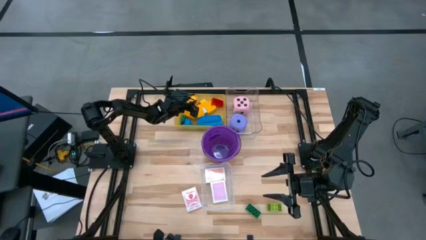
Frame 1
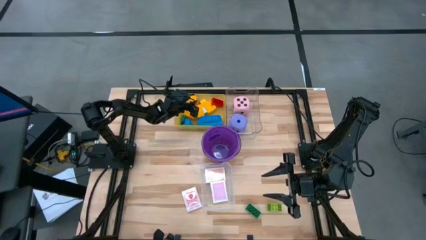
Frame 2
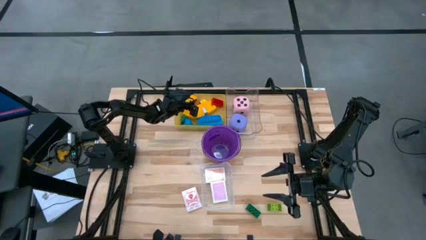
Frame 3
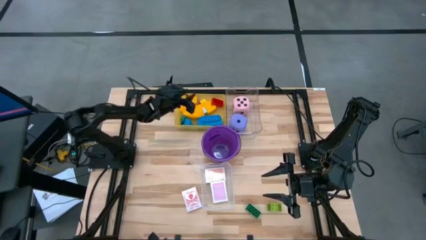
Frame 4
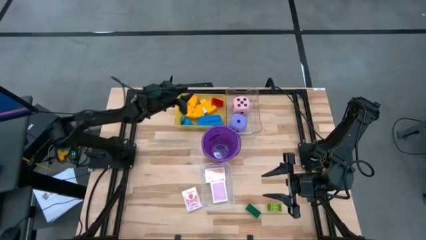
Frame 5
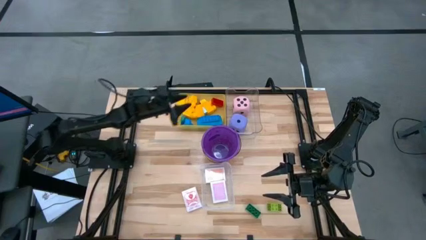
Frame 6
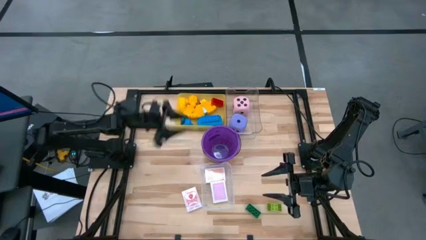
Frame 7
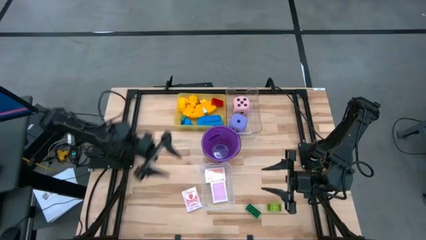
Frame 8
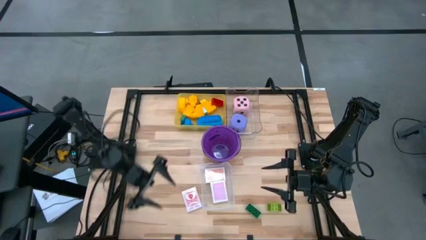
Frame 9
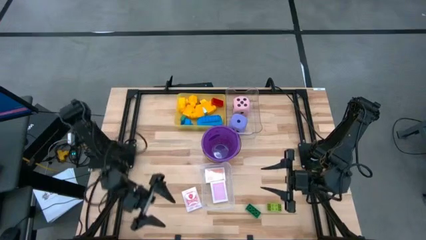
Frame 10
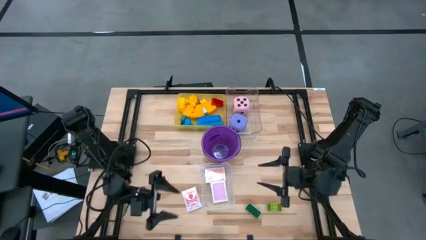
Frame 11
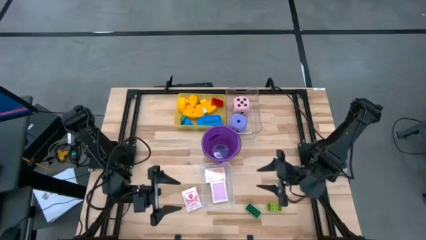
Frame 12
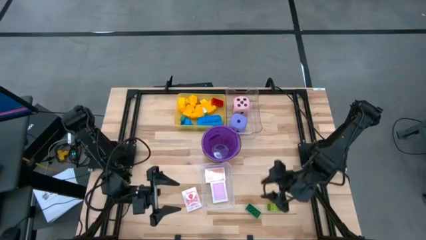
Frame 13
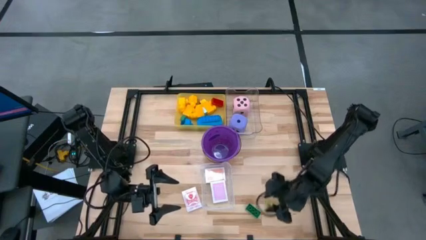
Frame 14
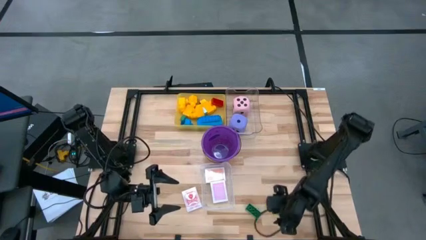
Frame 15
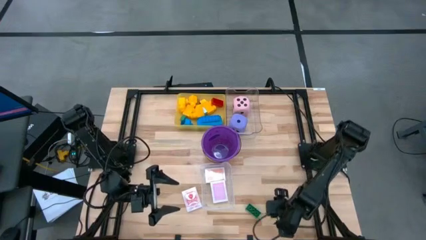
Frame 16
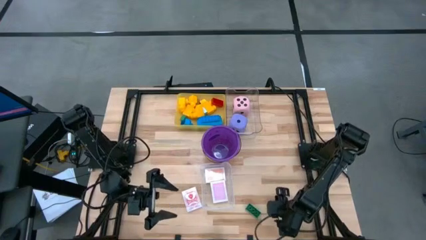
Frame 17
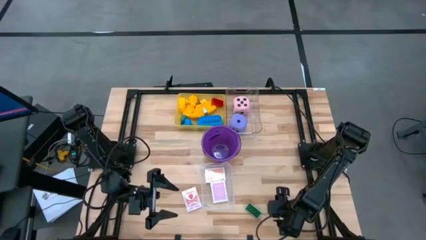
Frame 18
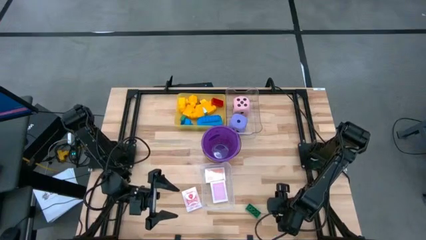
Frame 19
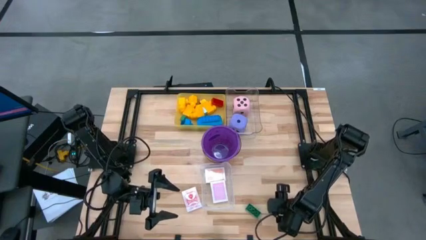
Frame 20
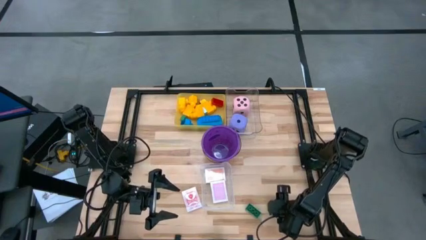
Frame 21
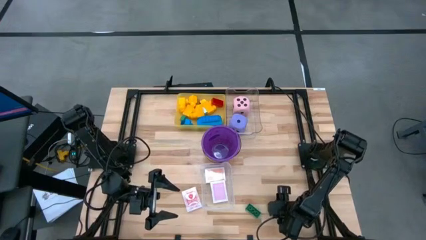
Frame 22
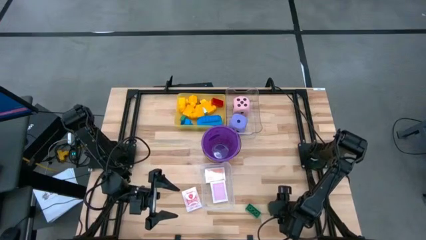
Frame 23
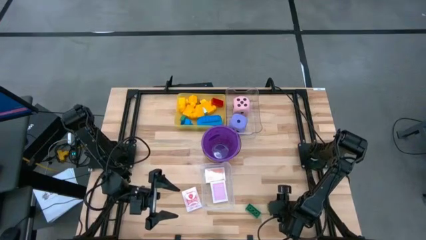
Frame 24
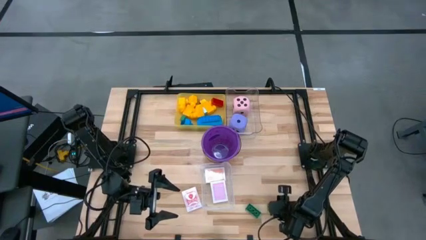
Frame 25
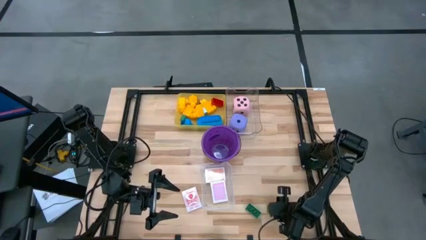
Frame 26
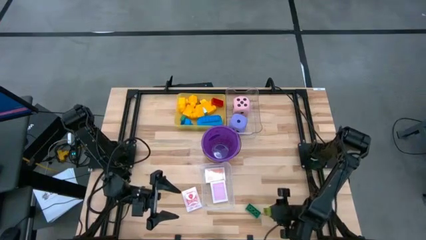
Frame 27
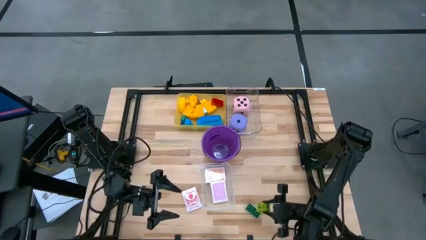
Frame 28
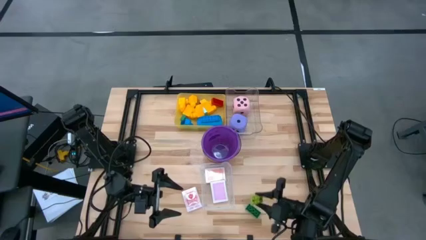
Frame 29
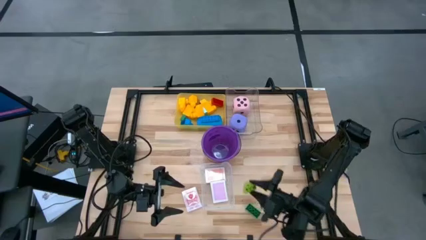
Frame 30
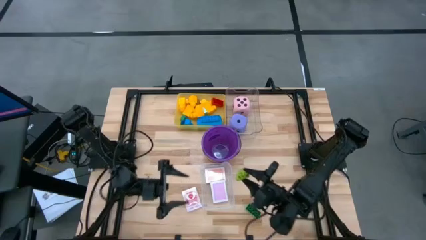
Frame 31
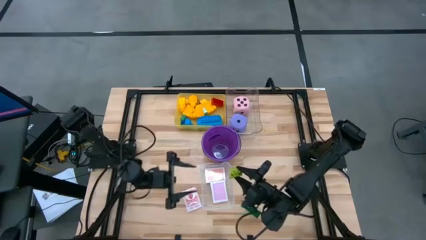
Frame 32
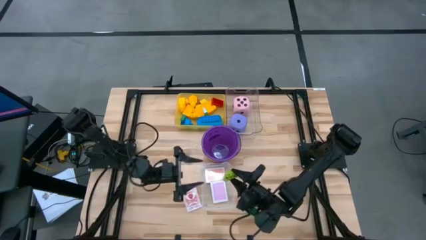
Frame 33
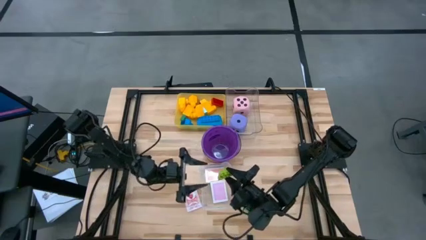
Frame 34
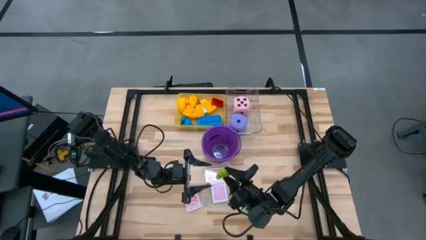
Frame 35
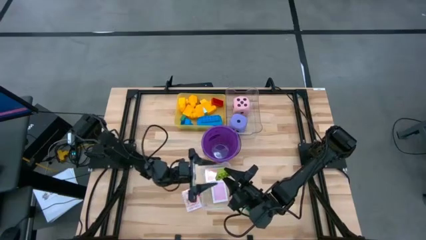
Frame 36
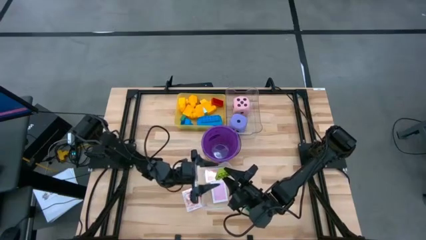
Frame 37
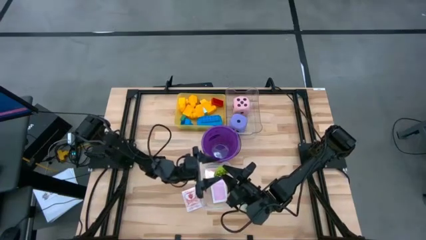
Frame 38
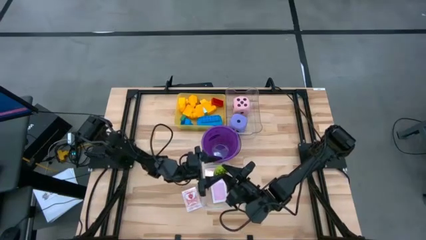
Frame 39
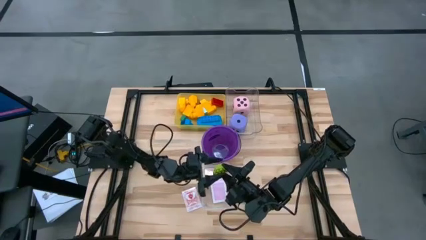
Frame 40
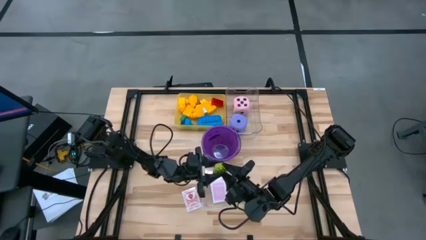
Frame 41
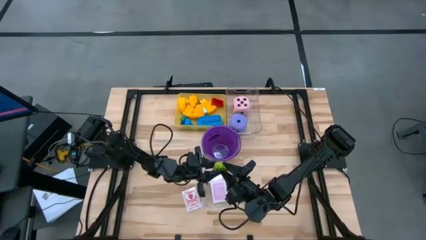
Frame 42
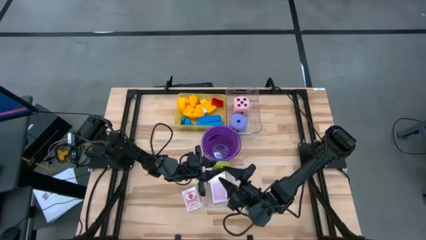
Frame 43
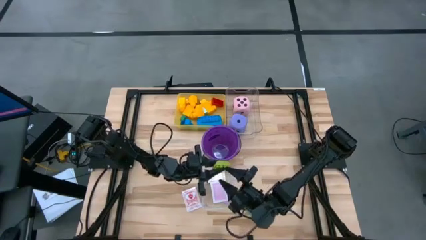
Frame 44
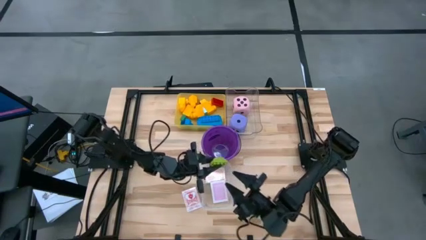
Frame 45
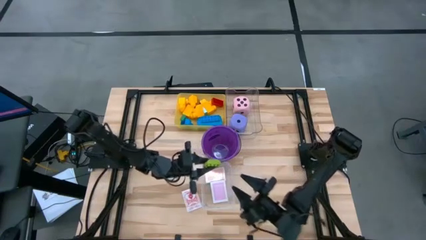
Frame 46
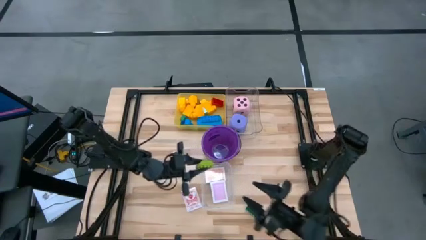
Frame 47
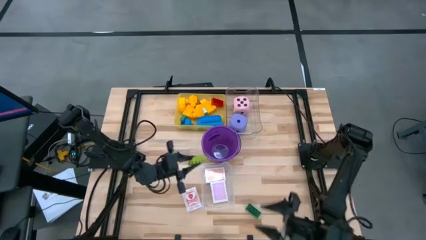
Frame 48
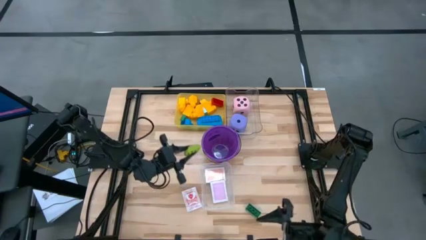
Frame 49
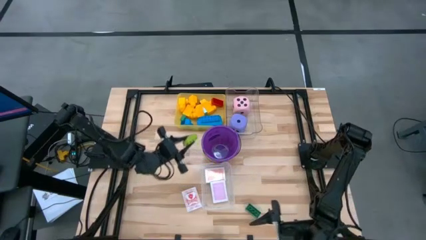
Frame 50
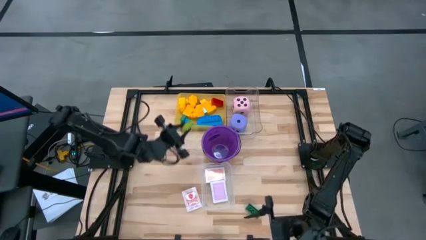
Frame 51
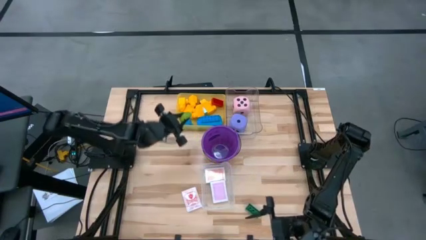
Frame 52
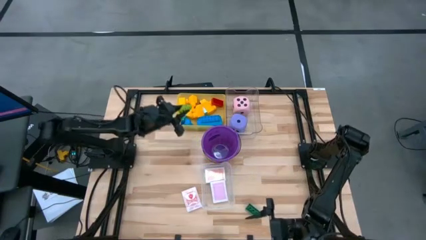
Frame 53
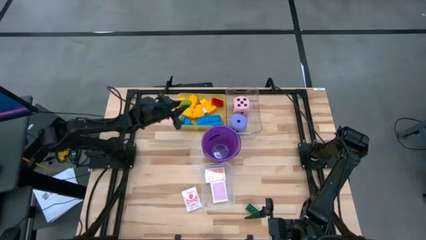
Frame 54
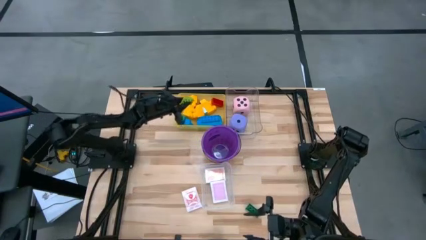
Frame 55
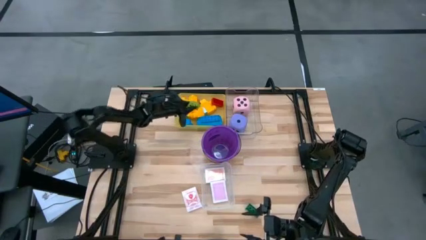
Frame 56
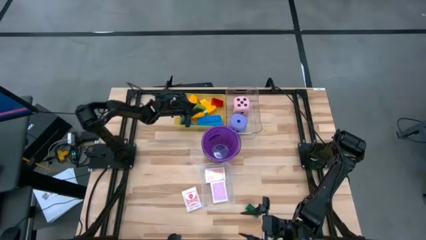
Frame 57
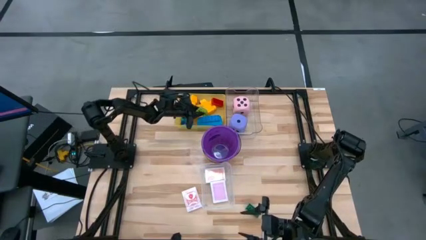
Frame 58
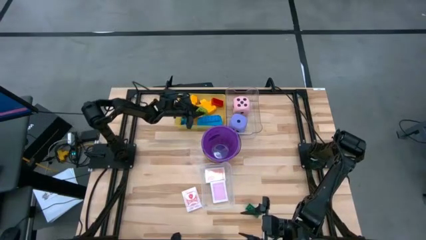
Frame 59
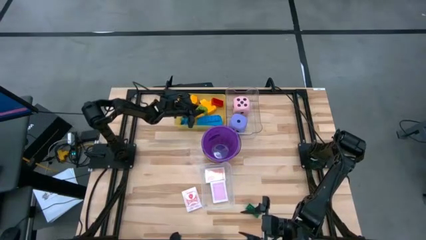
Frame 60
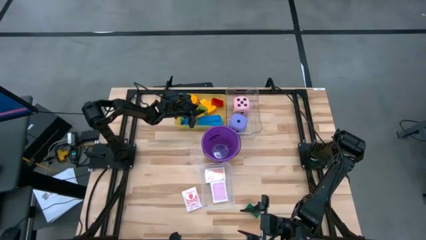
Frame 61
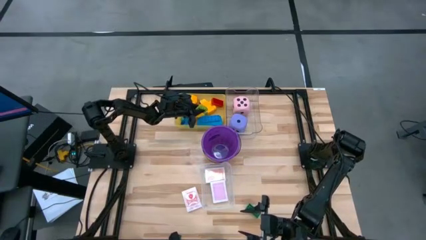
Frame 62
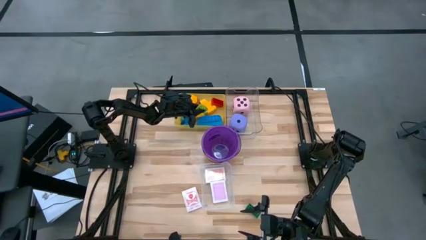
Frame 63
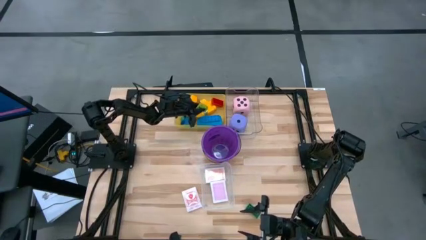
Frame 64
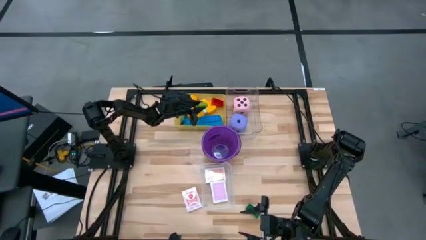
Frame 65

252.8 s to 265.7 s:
Task: Pick & Place Toys
Put the light green game piece into the yellow bin

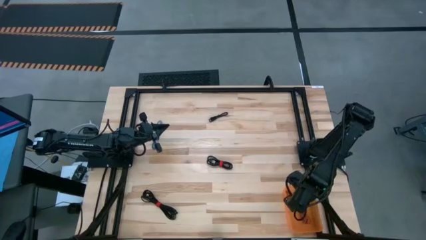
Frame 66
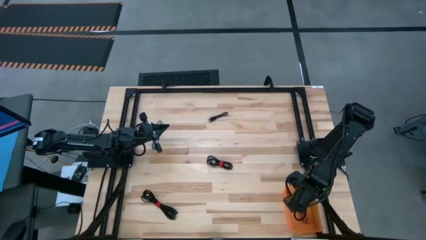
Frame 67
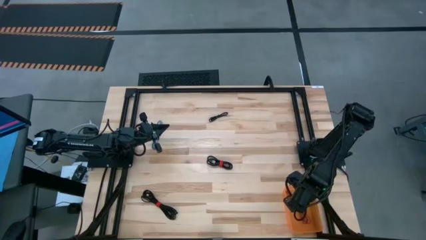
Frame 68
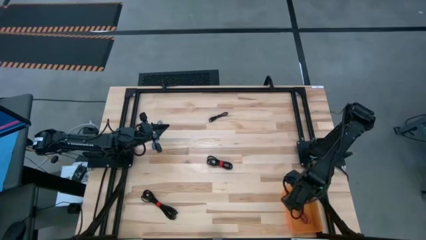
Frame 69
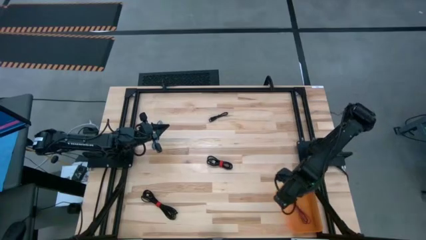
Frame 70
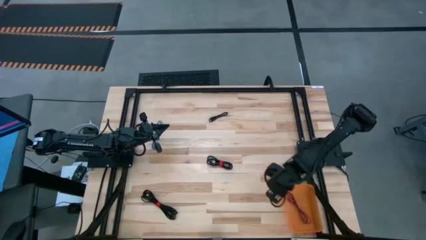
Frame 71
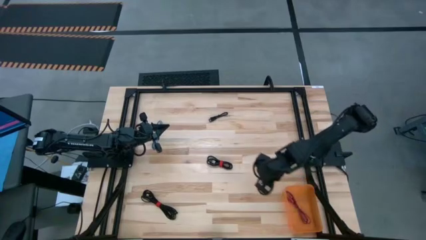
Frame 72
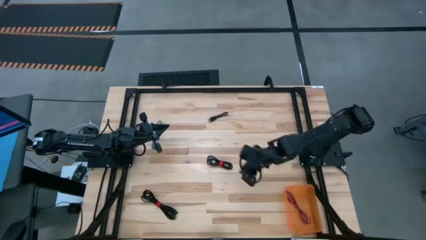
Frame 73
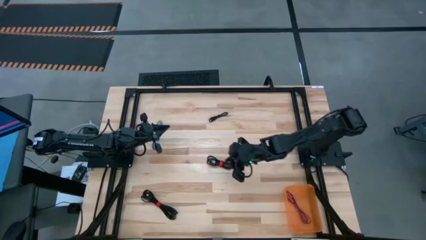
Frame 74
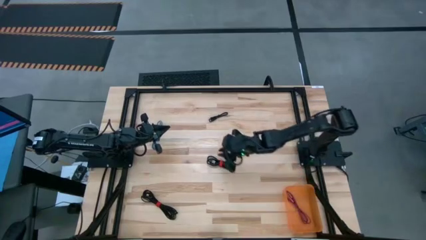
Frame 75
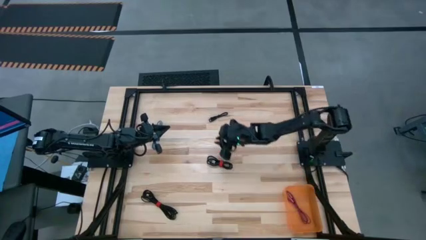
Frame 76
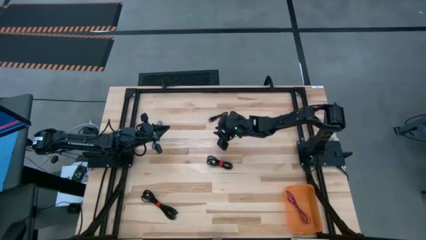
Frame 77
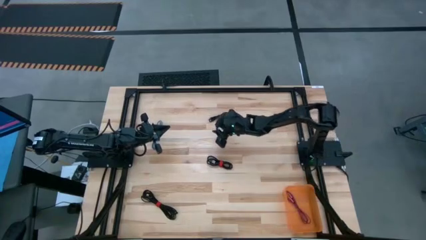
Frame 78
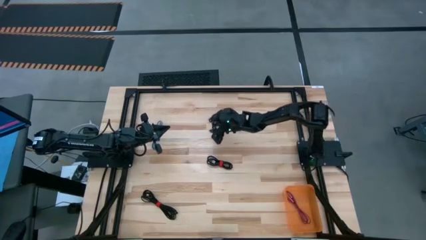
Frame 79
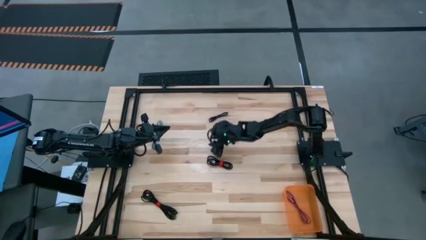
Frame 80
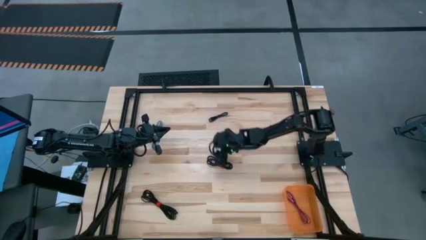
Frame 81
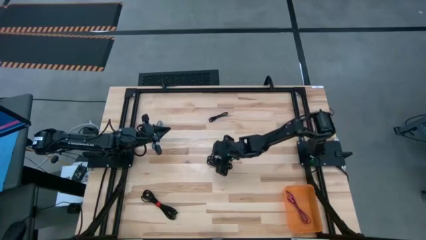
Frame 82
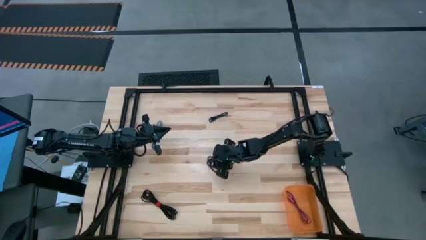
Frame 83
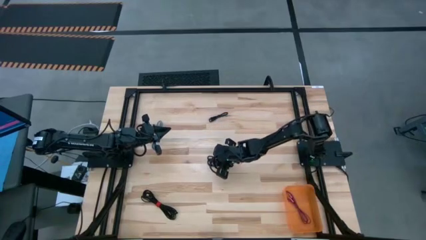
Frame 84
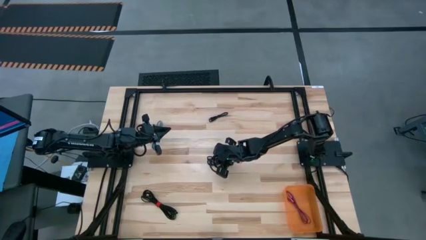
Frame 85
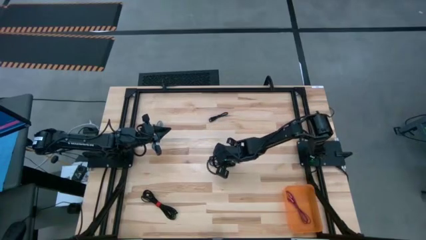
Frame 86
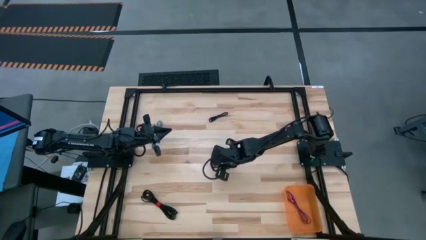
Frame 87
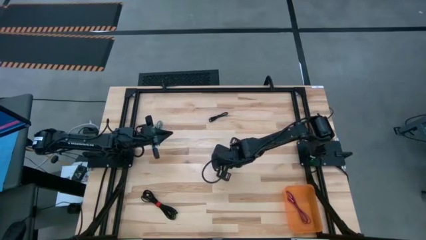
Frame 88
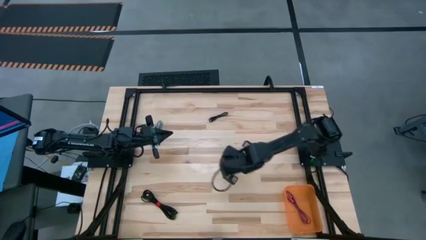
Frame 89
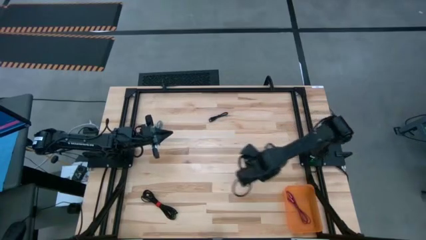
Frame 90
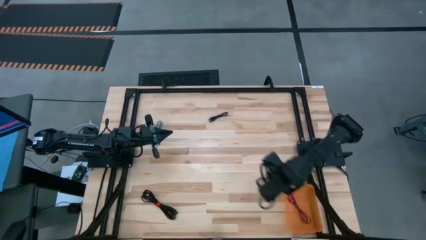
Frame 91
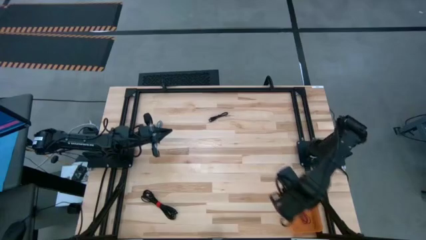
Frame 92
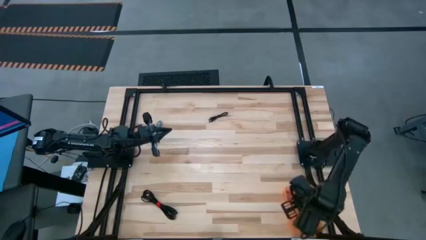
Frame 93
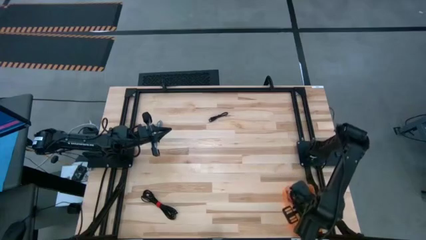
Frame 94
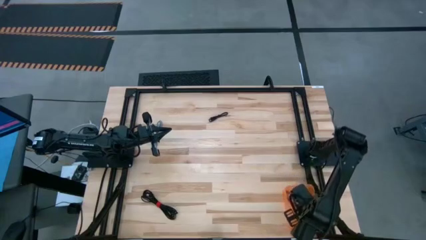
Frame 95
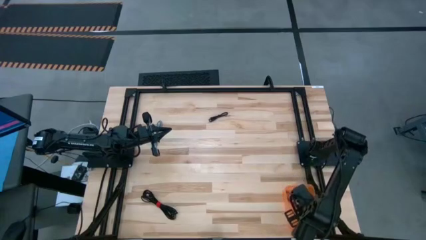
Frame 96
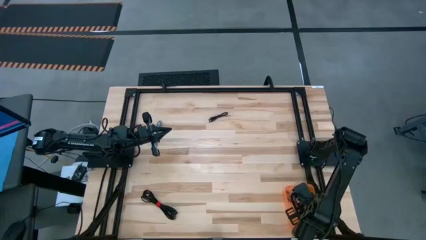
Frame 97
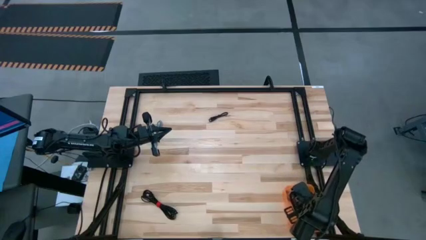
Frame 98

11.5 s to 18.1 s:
Task: Pick and place USB-C Cables
Put the middle black charger cable into the orange bin
